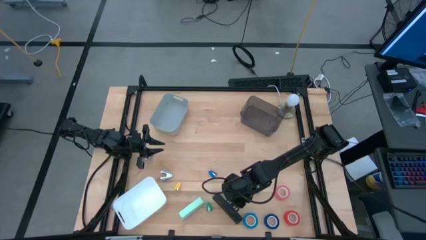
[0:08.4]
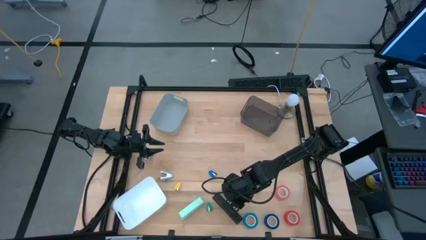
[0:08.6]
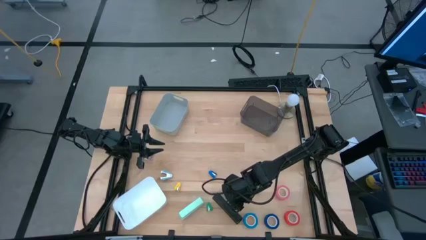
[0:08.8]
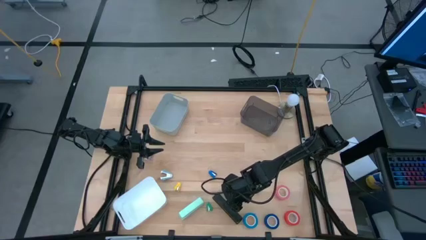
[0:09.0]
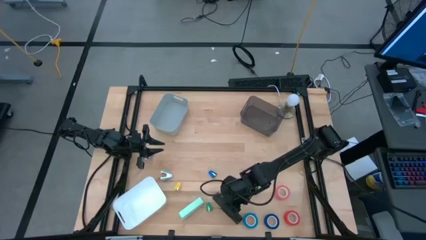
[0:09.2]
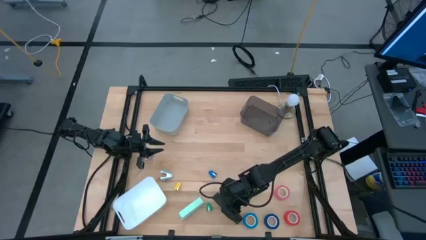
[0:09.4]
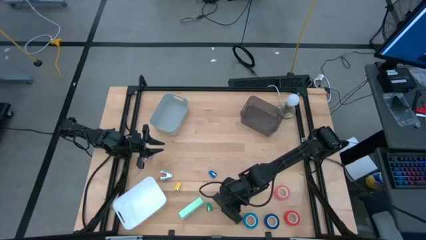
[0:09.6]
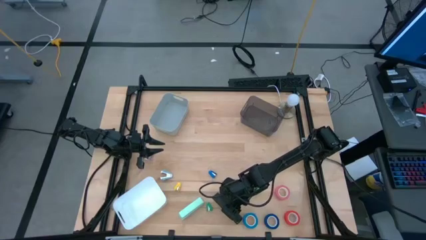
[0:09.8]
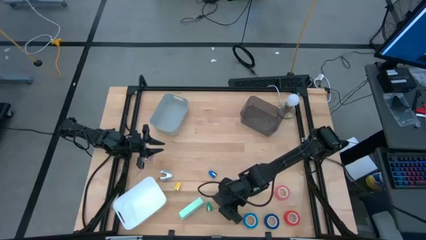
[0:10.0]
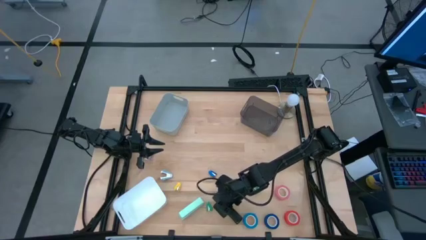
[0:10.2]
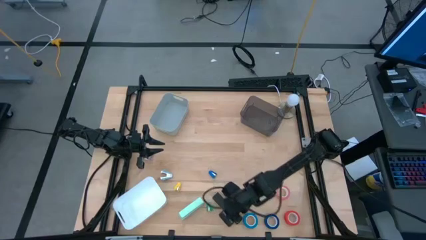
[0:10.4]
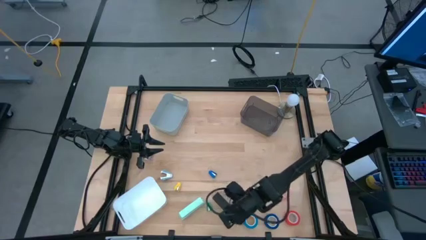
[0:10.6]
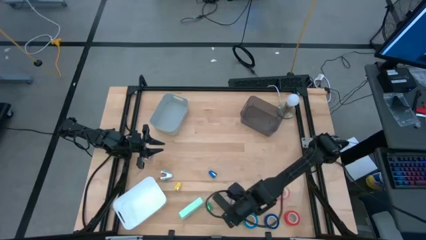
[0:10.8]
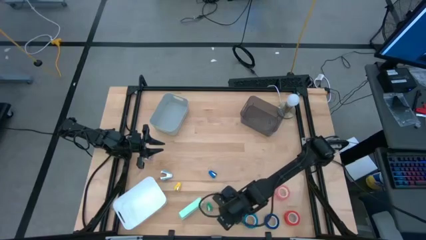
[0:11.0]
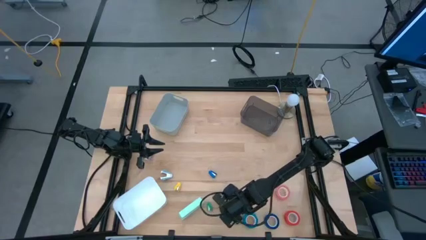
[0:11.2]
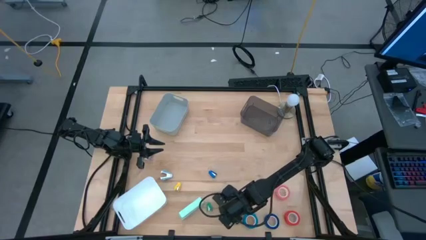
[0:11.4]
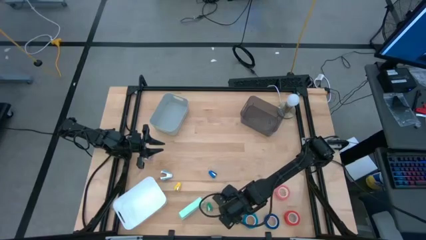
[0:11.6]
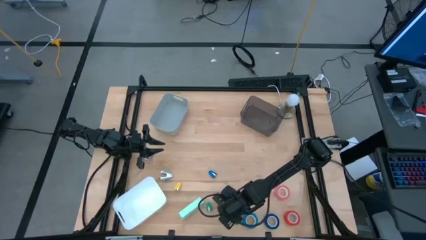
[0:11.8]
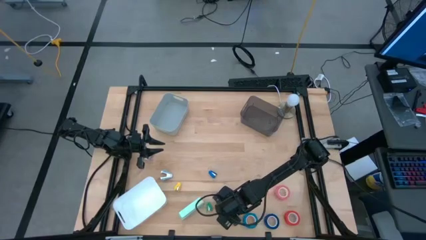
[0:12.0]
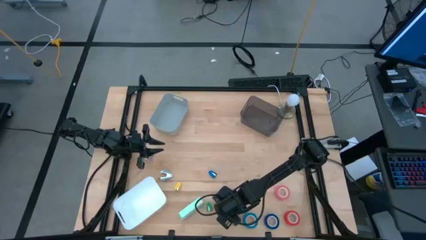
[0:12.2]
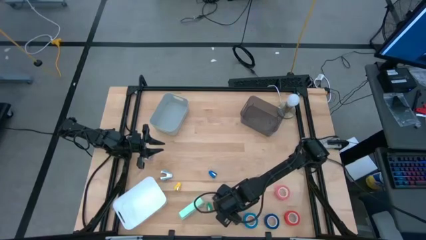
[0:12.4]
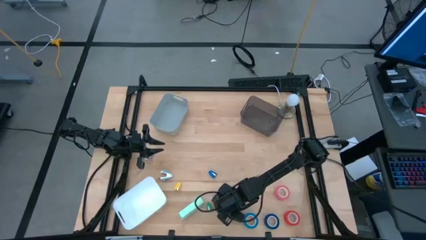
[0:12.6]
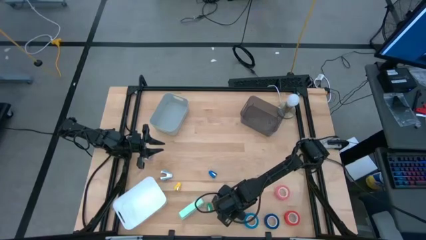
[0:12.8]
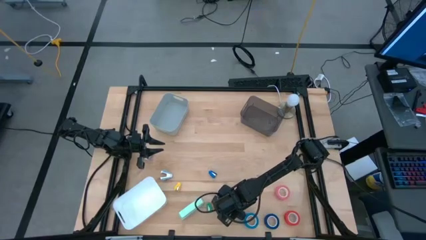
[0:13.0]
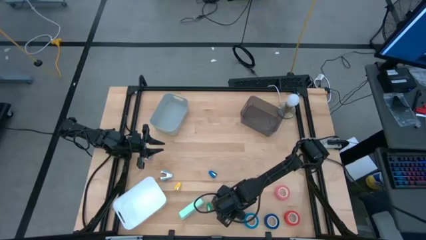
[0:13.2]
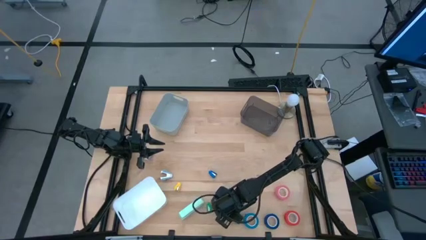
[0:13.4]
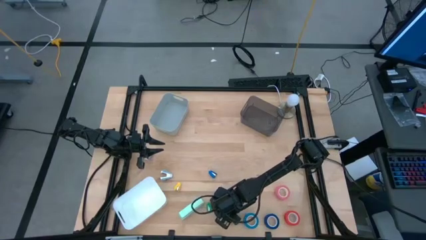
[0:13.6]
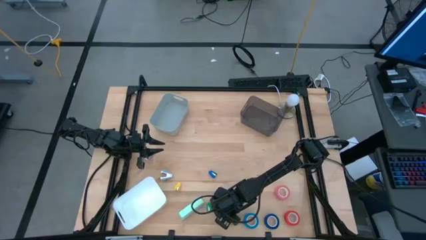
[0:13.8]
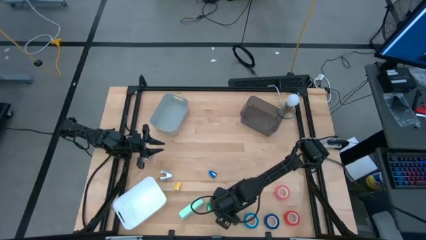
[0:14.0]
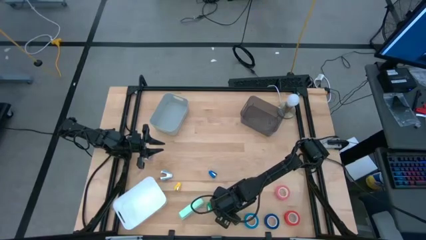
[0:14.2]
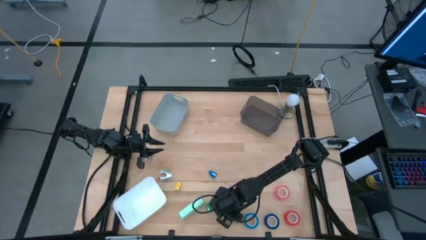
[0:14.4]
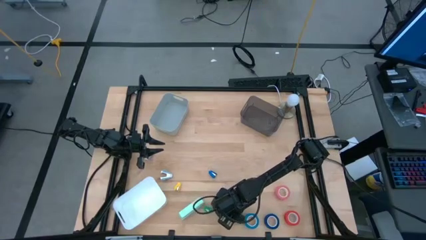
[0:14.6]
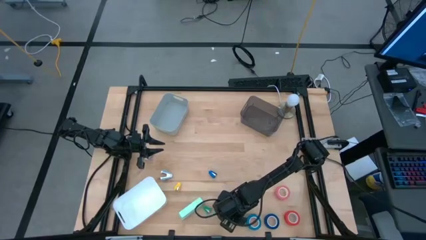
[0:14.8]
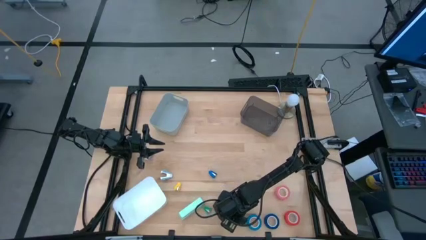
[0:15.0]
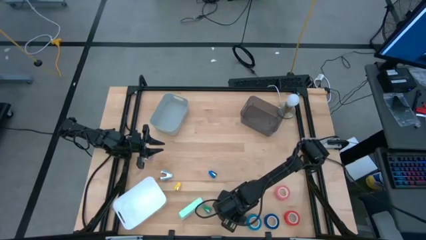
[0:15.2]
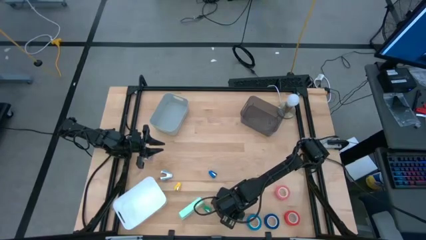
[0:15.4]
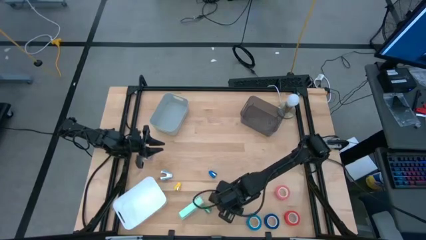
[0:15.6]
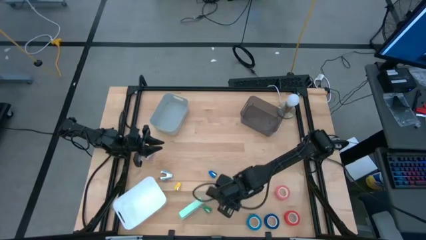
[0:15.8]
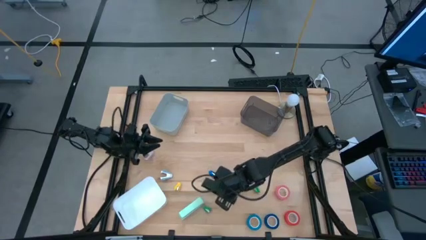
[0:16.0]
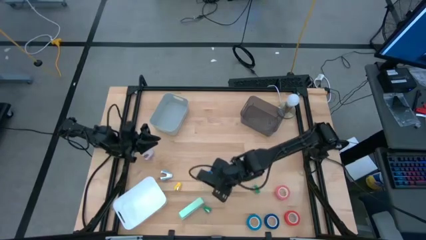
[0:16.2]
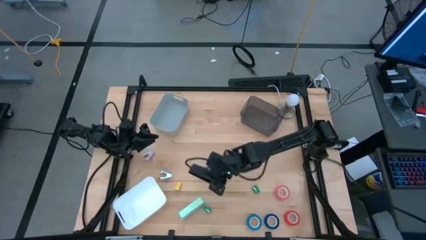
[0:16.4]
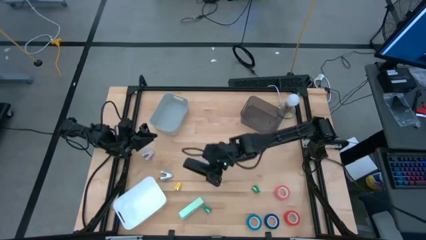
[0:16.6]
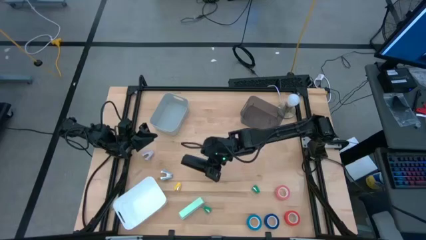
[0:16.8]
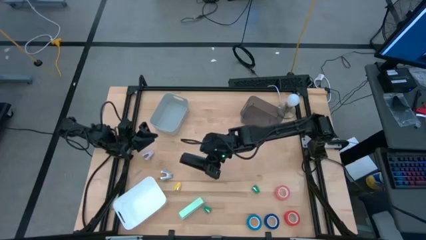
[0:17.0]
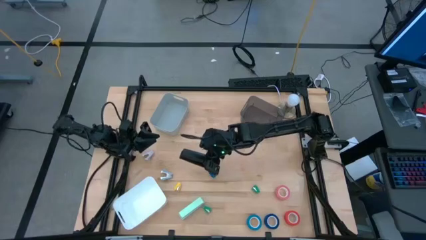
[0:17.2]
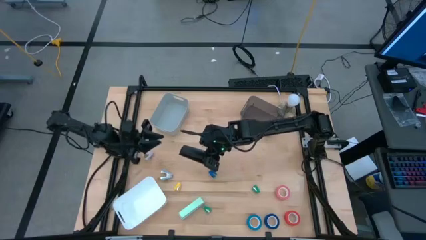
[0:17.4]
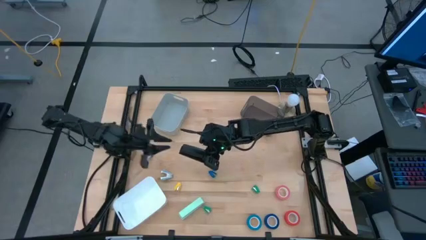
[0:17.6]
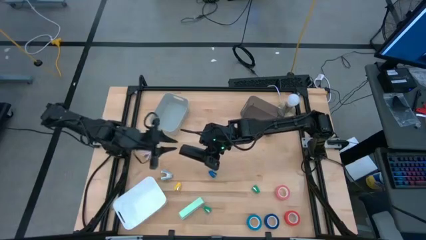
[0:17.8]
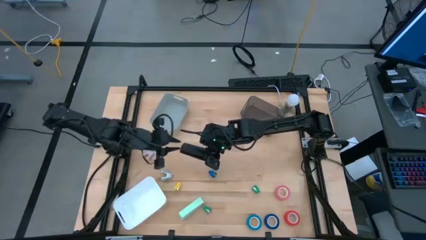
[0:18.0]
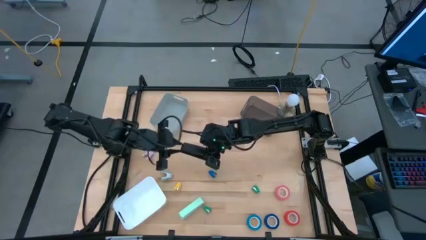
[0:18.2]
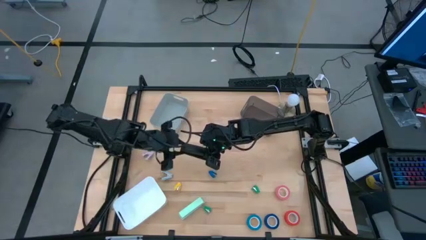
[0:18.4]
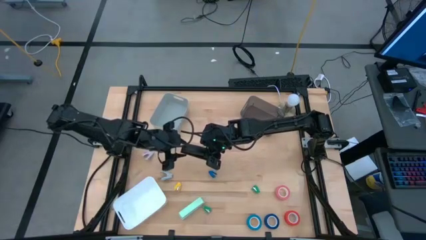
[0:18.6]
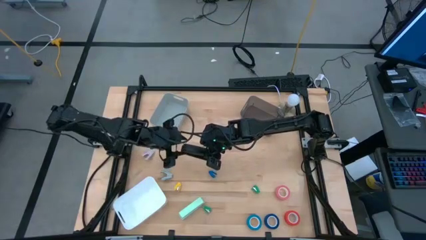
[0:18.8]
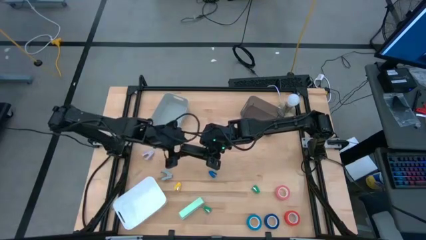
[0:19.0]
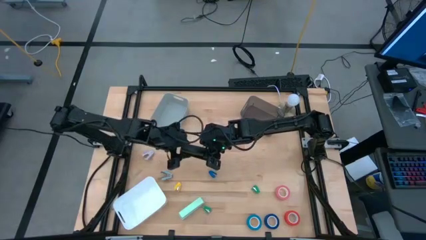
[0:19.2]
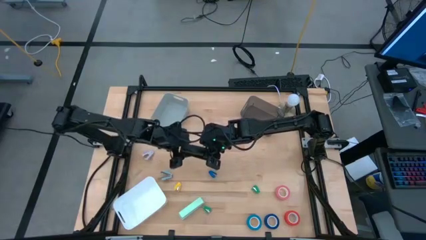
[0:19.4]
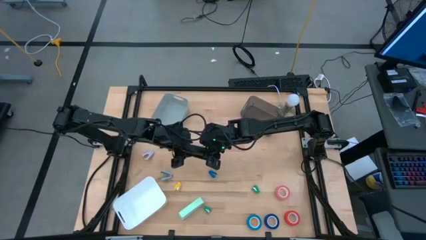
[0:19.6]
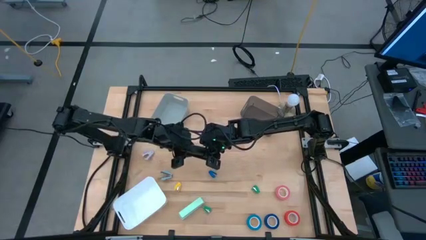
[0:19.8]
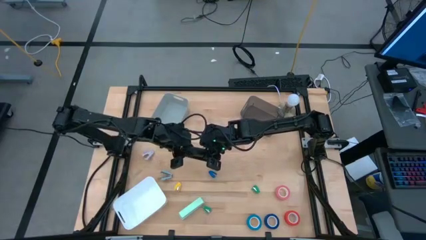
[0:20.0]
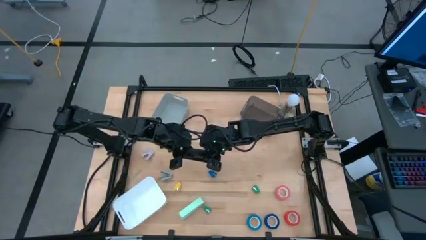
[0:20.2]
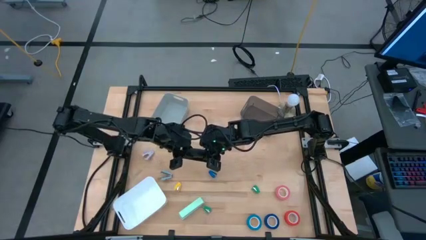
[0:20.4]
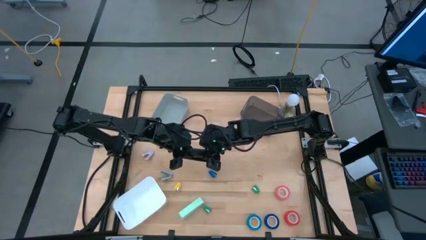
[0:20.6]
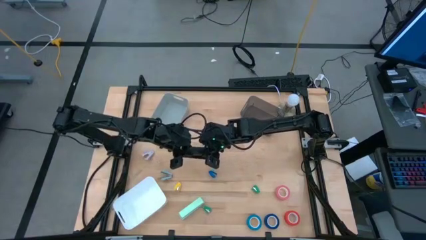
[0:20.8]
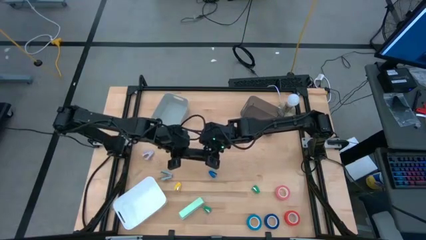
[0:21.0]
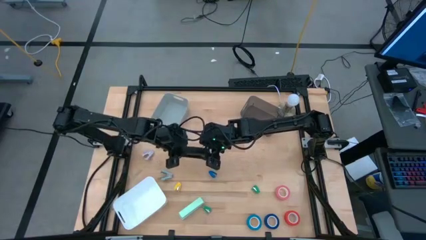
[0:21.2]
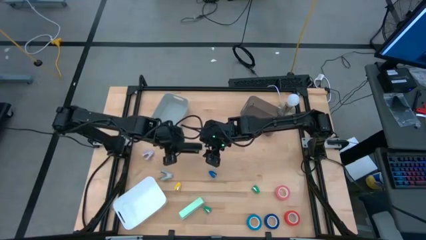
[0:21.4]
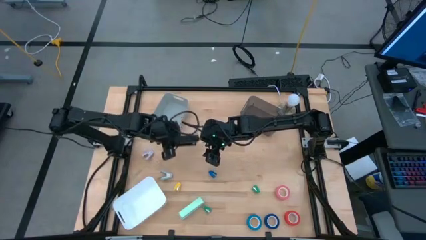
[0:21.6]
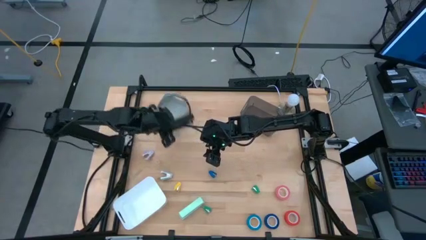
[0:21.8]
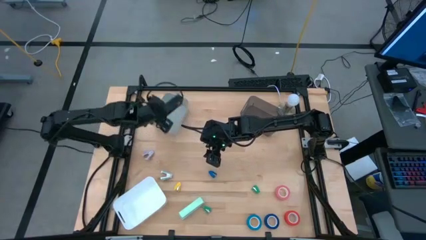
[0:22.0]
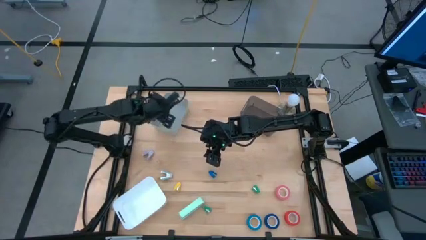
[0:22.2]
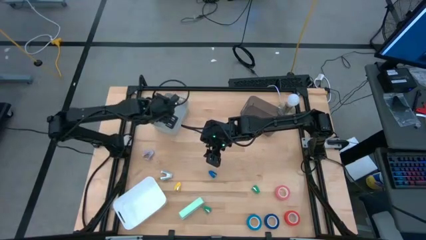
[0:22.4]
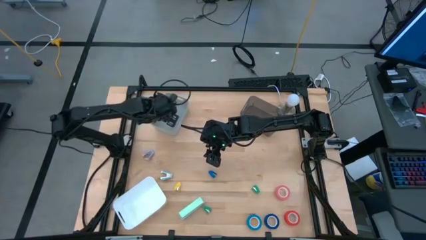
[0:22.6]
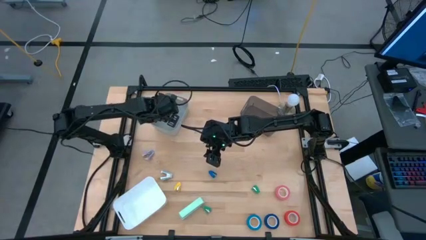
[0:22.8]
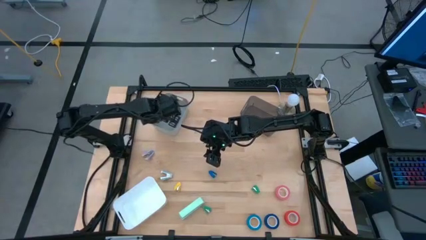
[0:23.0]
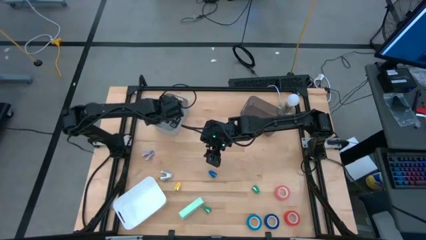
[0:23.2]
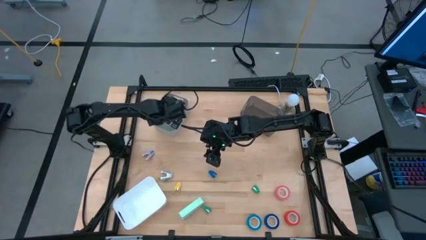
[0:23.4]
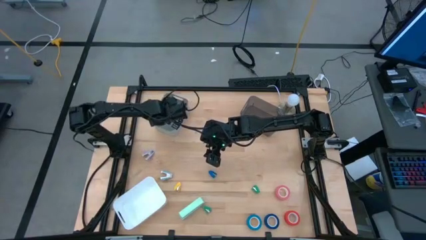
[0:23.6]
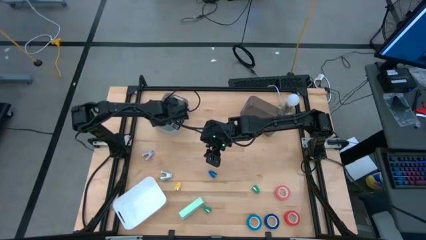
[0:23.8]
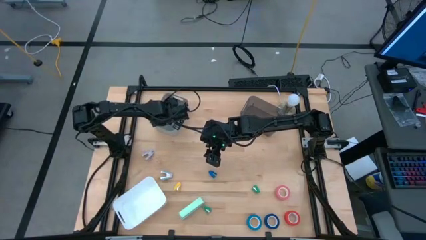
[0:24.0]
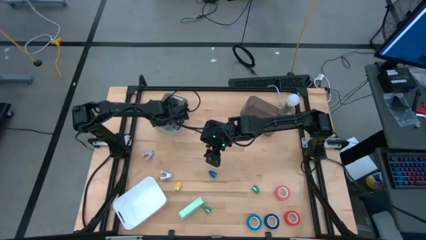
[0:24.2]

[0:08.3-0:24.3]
Task: Pick and place Stapler, Stapler remover, tape
Put the big black stapler into the gray bin
